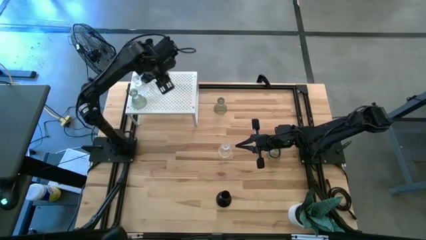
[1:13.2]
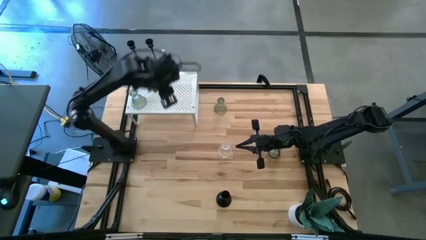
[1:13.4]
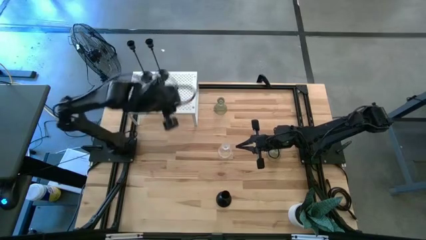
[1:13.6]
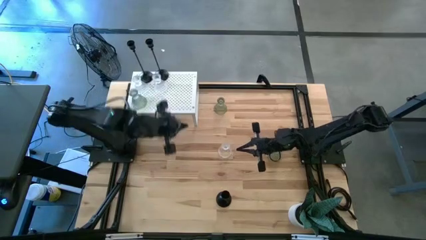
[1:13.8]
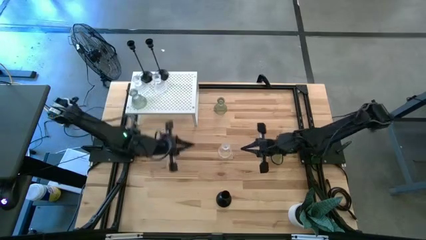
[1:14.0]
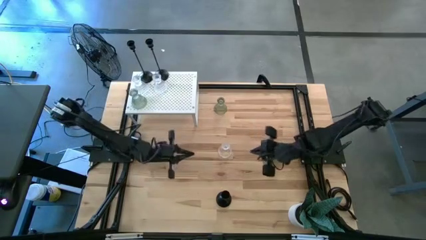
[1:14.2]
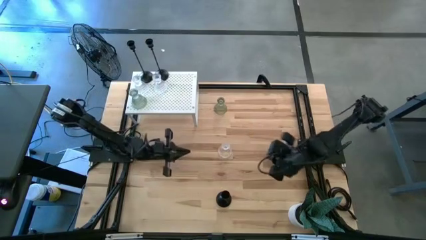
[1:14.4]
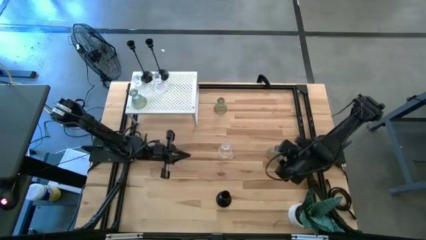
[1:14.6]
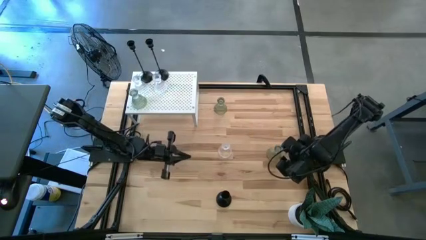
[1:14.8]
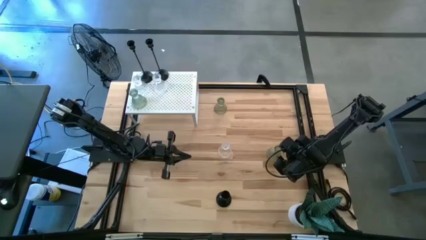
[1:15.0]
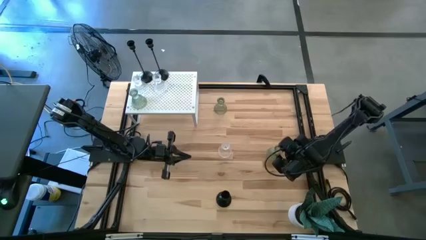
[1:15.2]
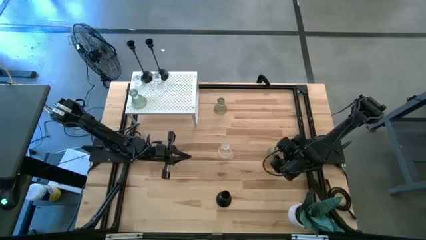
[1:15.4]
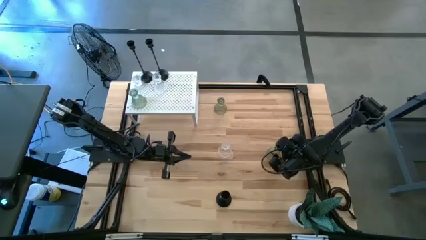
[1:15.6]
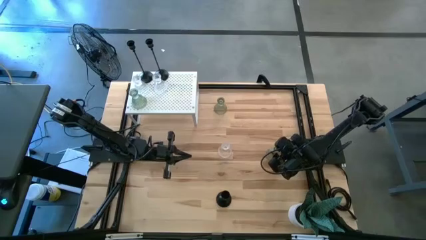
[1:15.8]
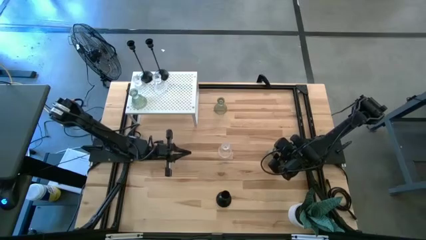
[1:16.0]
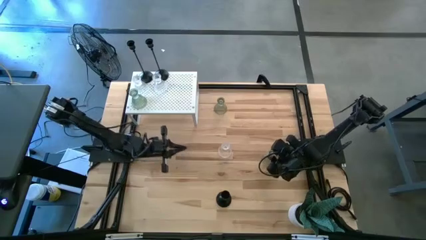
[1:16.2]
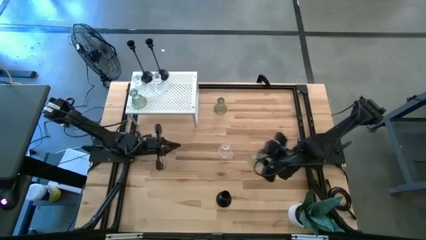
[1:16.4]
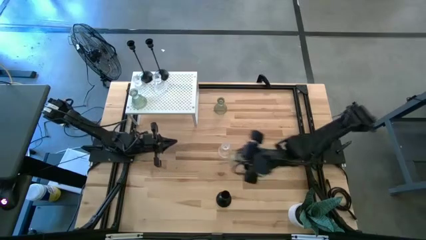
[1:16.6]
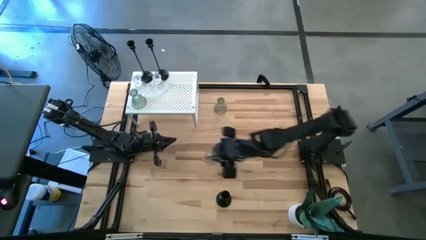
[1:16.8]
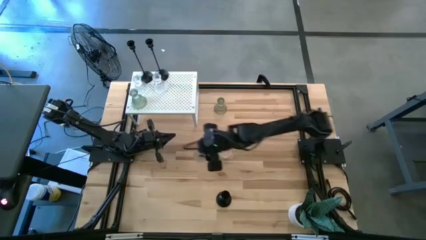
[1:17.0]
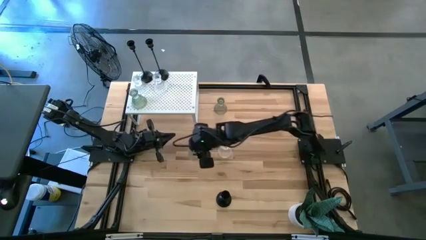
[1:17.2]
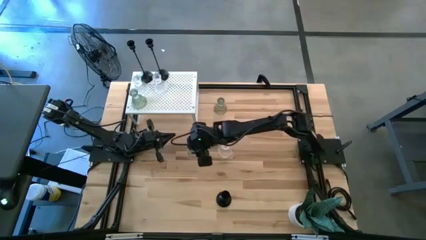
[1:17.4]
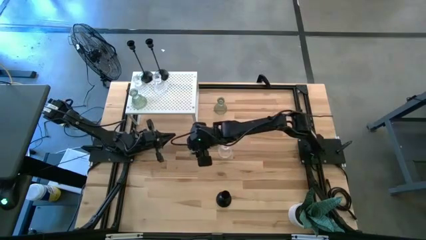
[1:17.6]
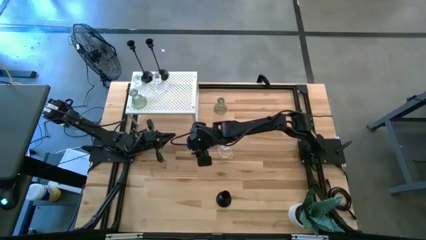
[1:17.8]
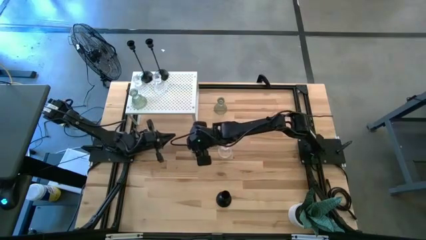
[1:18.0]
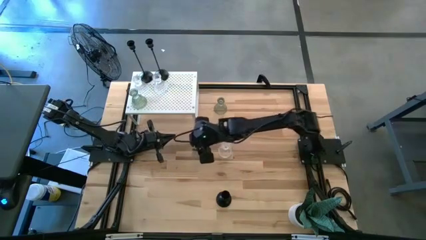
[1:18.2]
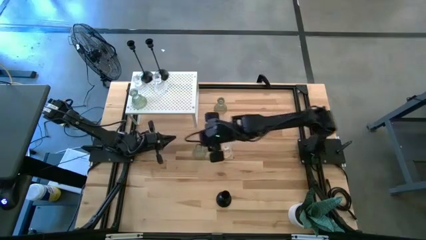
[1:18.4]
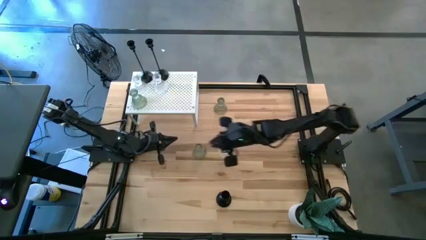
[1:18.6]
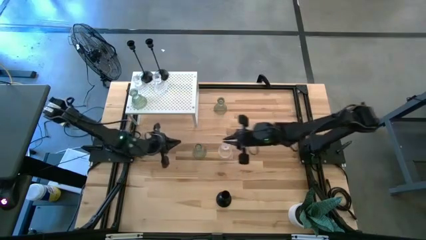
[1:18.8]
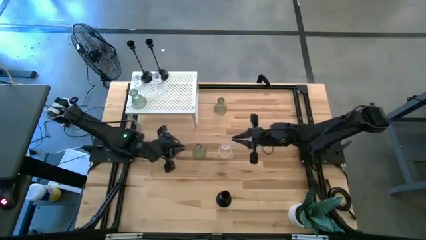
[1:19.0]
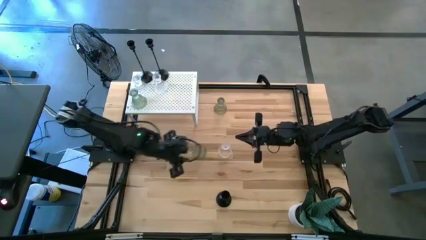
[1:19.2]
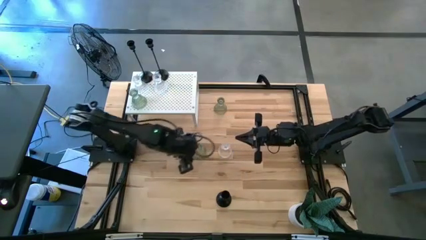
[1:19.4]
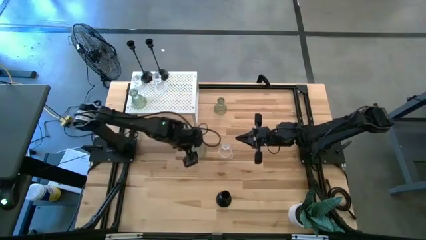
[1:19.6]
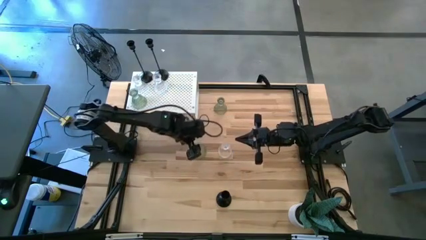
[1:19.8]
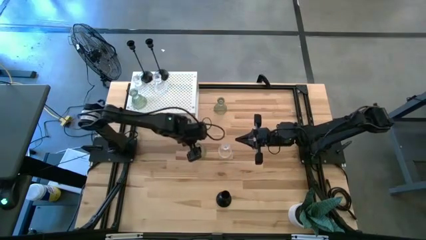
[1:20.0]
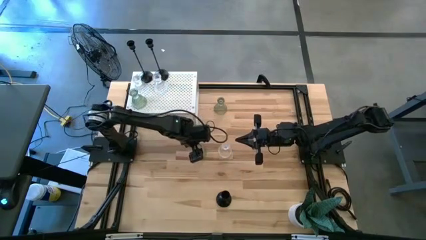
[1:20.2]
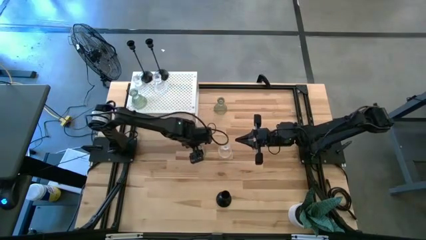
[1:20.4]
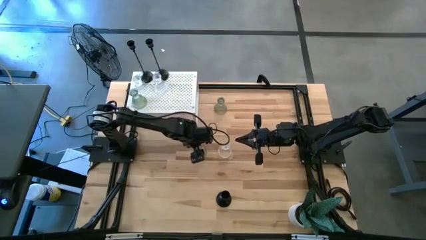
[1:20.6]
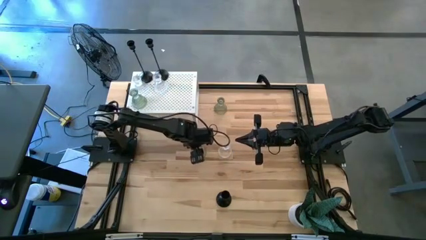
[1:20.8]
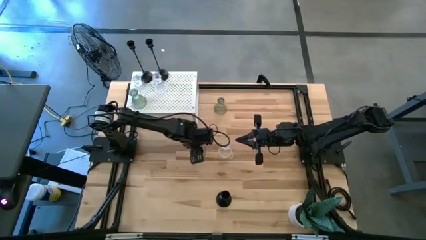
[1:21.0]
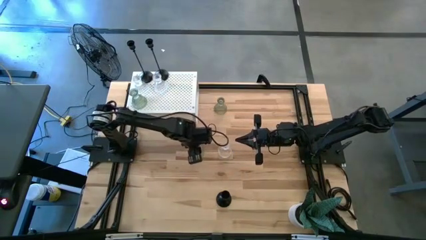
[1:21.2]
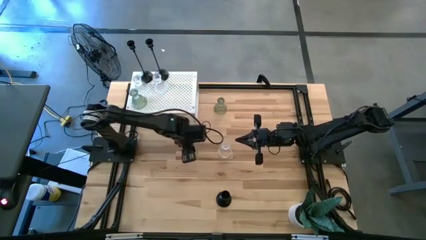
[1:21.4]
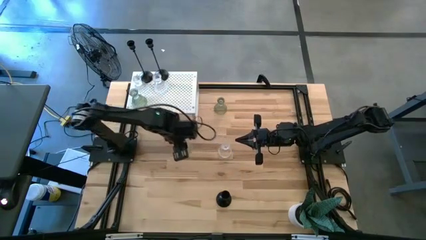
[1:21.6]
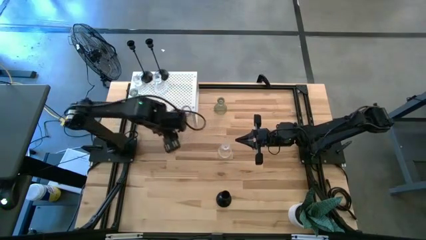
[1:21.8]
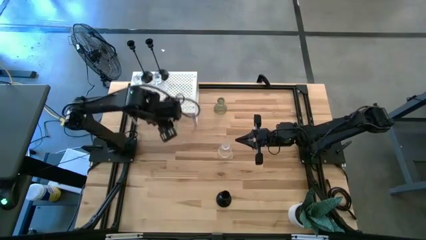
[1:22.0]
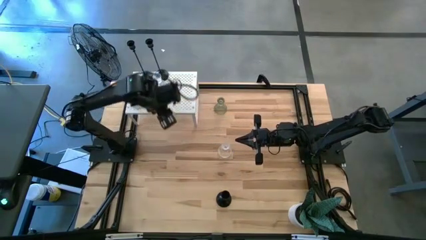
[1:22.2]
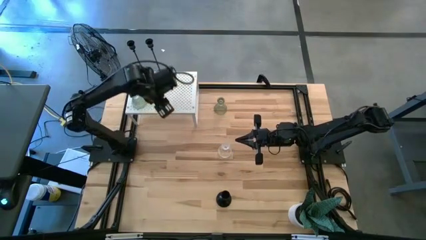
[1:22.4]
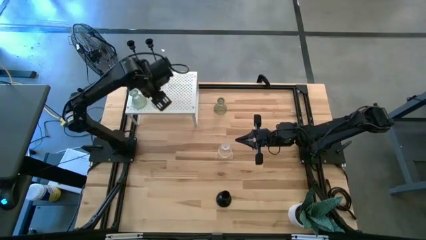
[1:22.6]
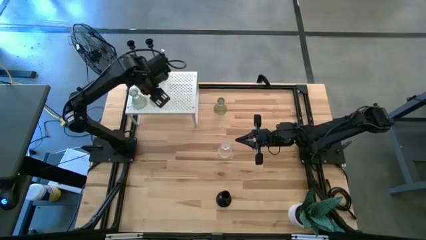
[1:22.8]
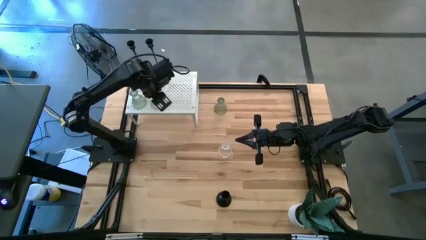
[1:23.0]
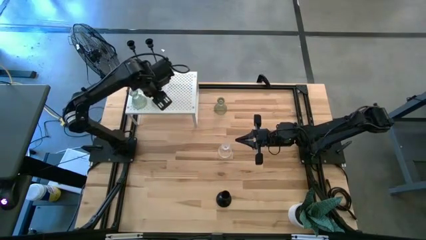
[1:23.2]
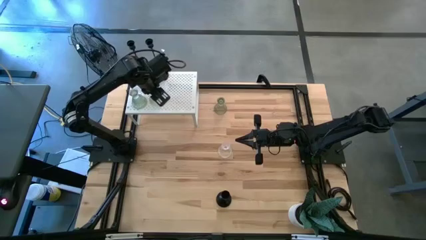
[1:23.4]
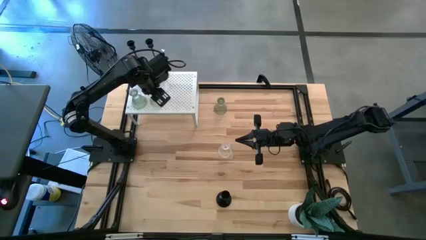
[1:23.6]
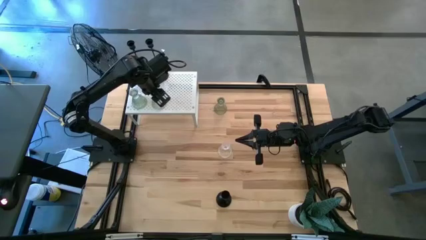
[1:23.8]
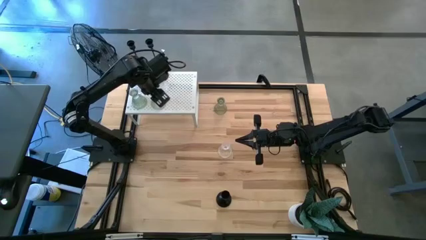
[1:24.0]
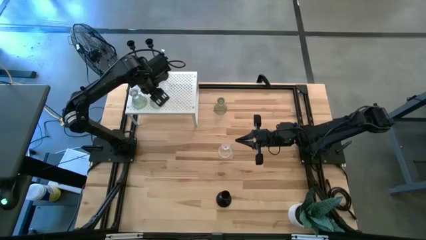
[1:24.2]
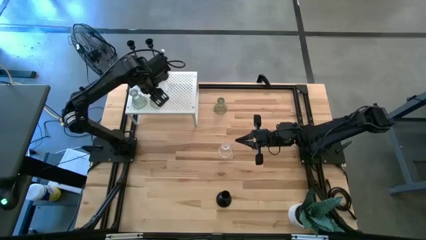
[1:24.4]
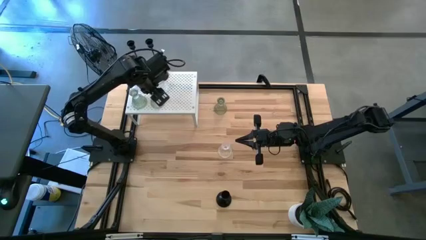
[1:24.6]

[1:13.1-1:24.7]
Task: Pick & Place candle stick holders
Put the bottom green candle holder on the shelf aligned with the green candle holder

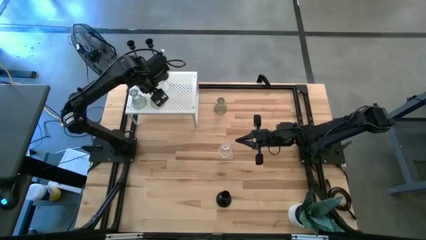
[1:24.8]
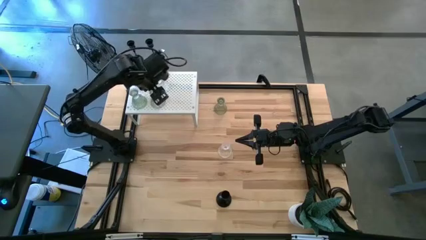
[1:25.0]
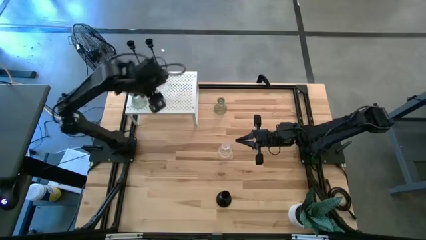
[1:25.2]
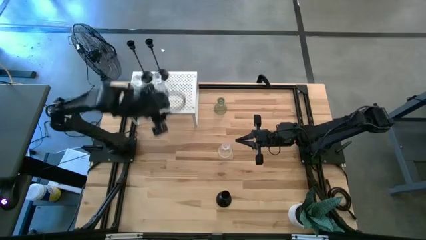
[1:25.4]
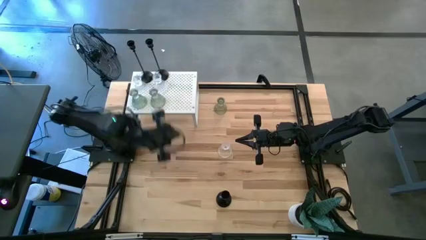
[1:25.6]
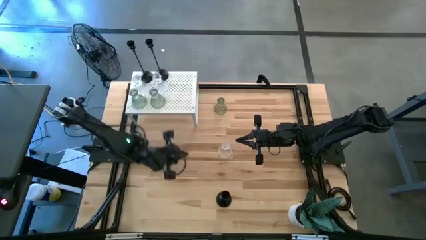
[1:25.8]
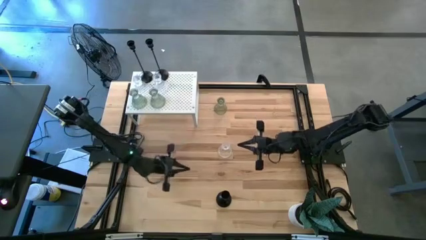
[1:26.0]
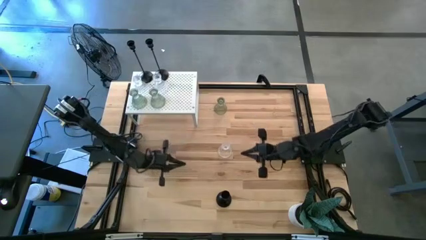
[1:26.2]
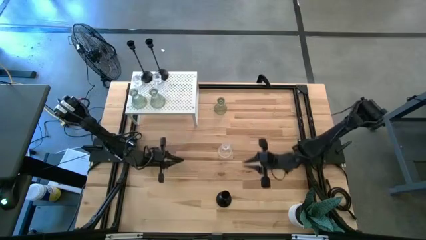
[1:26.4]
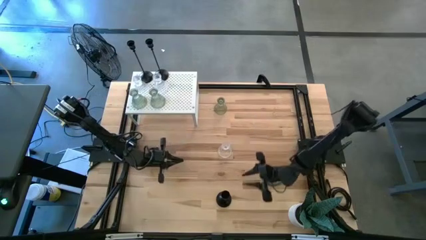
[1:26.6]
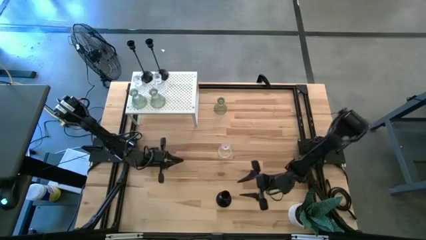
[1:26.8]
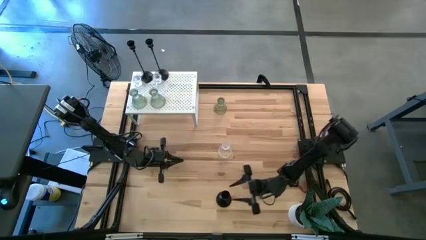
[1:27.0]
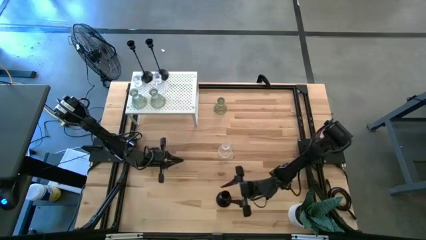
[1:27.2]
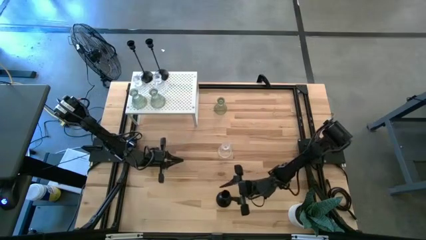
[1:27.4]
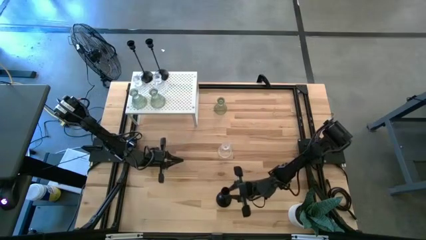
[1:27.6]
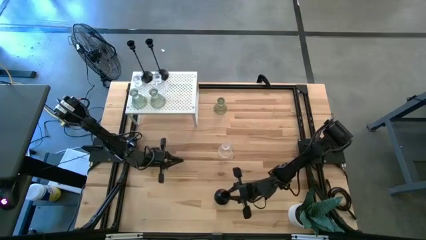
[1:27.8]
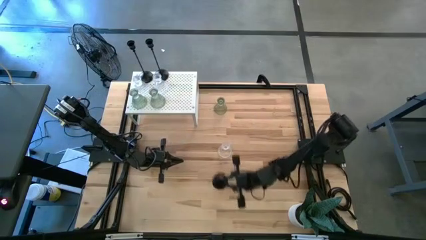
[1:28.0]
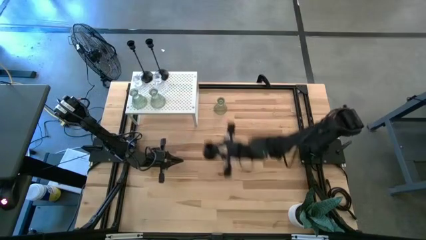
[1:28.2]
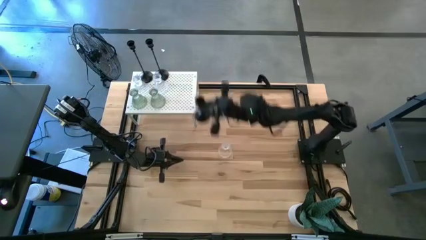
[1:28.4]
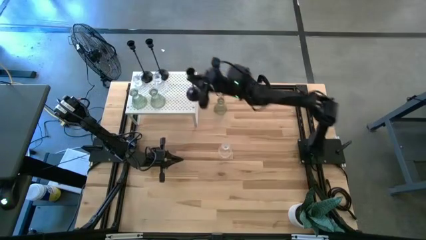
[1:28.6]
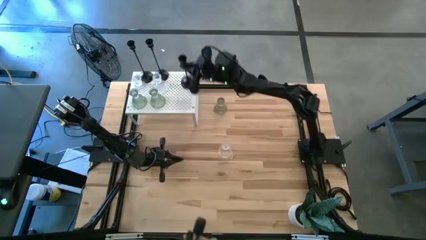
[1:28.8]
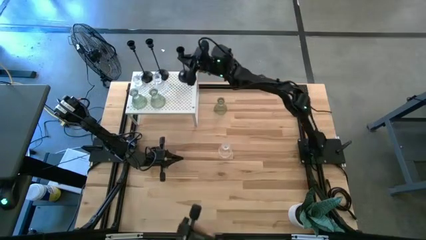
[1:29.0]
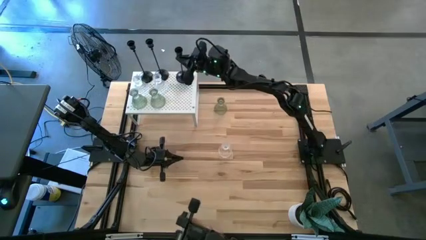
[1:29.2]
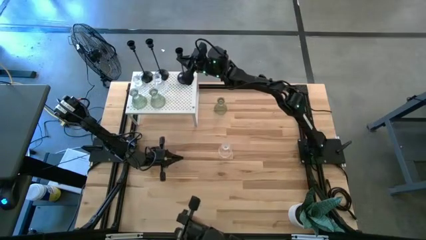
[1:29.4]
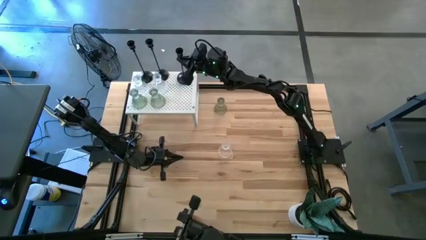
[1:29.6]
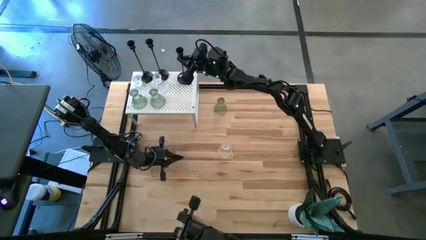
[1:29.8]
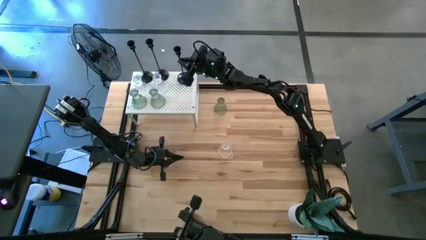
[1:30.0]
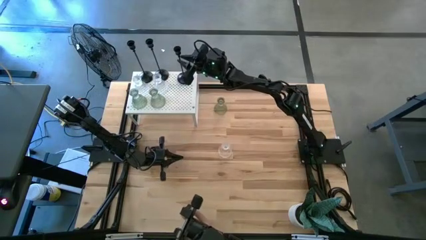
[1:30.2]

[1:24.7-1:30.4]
Put the black candle holder on the shelf aligned with the black candle holders
